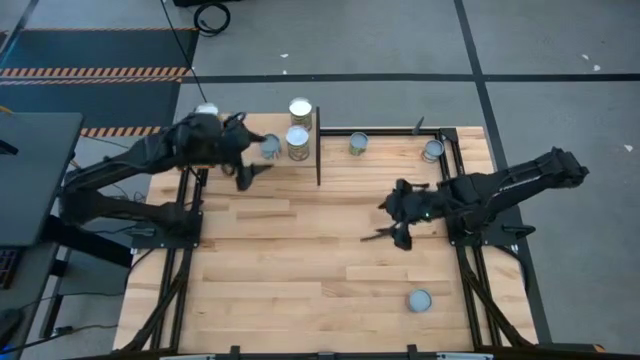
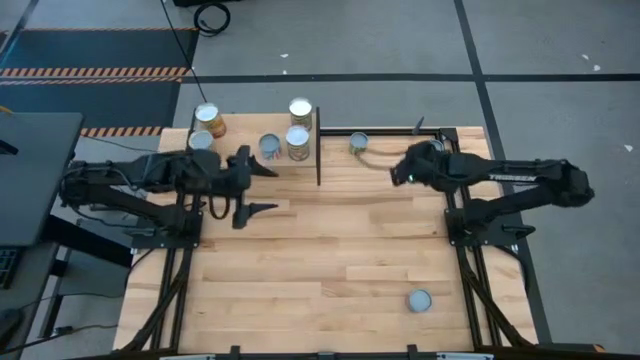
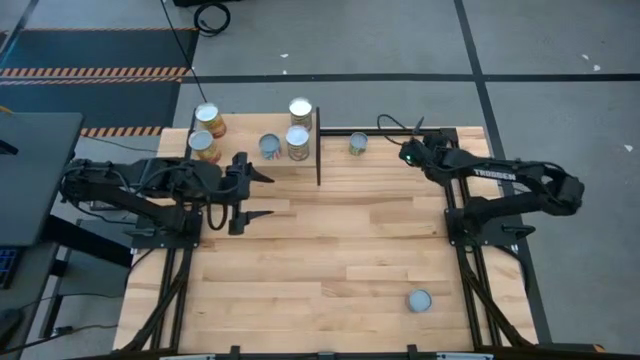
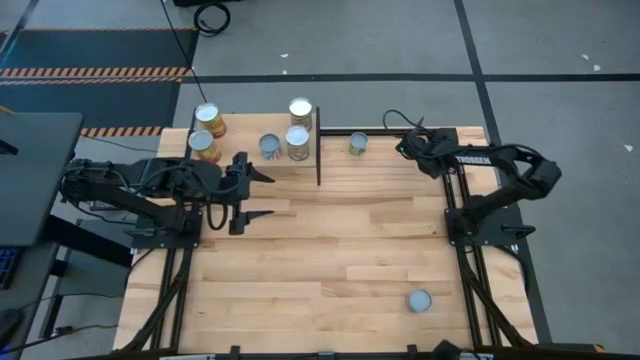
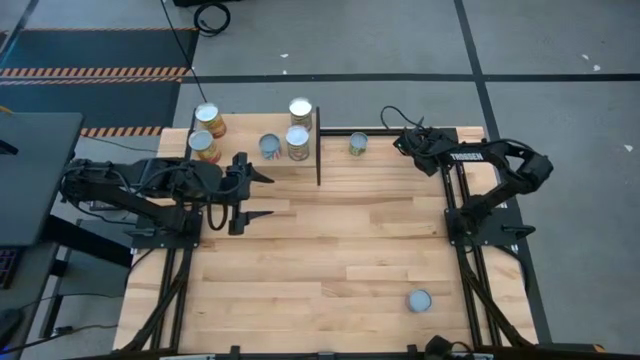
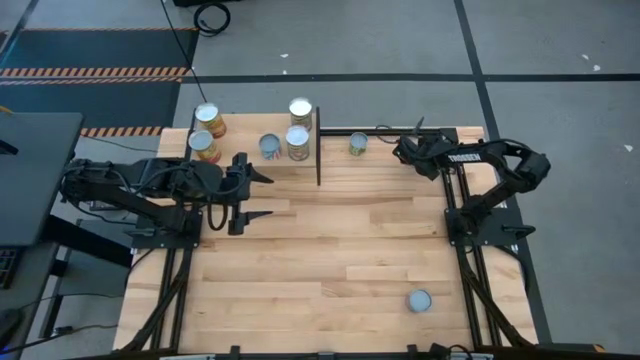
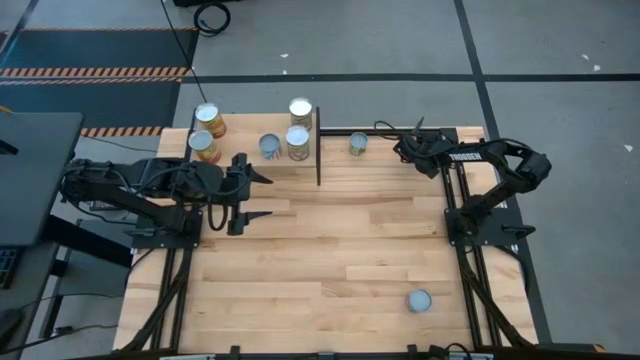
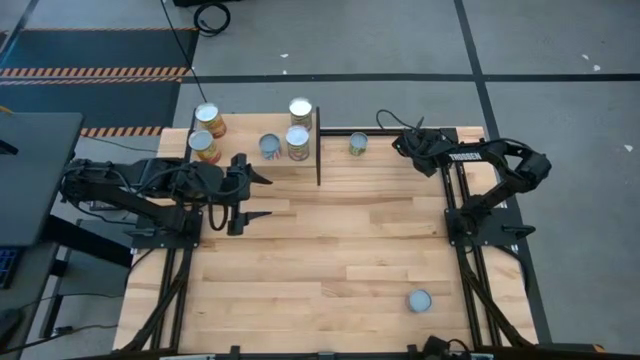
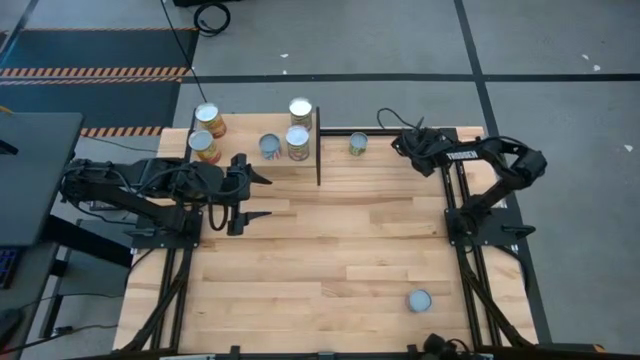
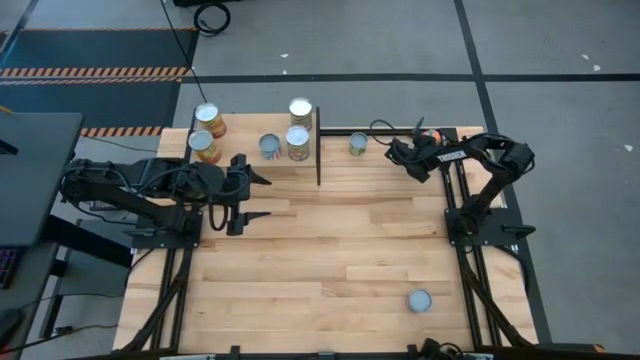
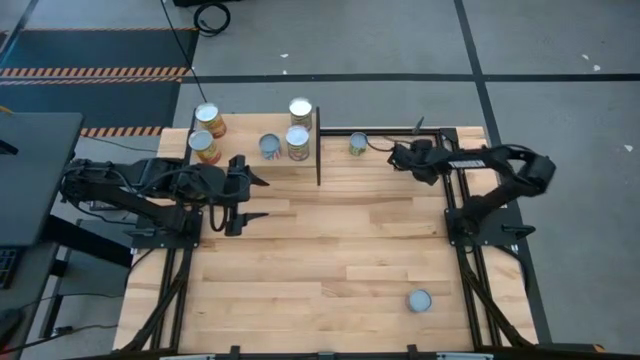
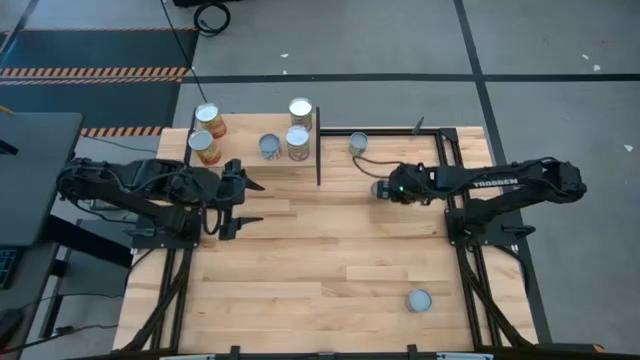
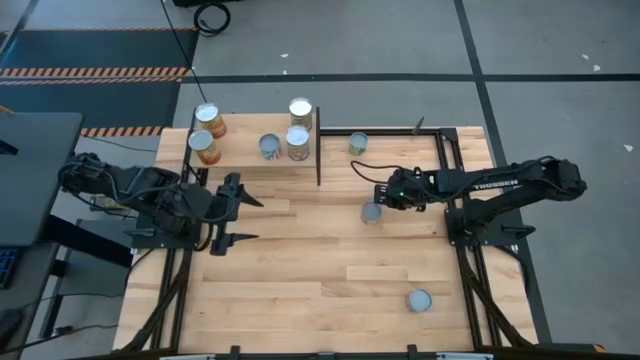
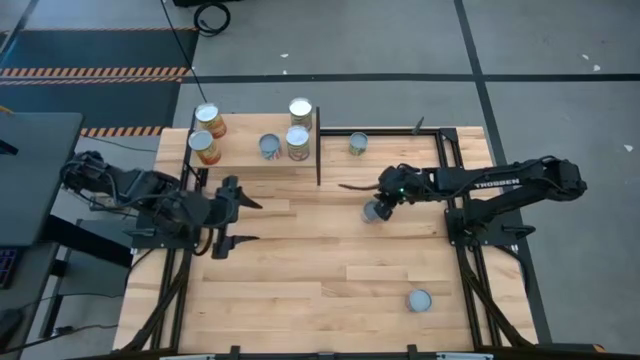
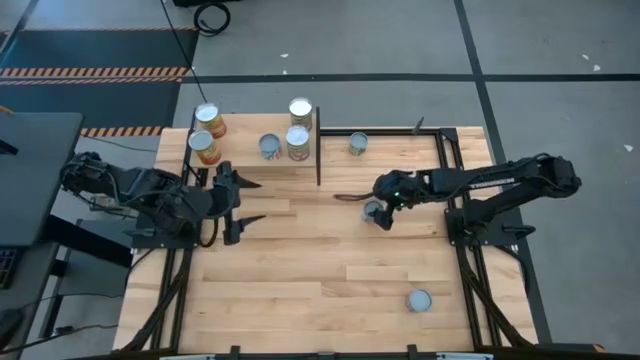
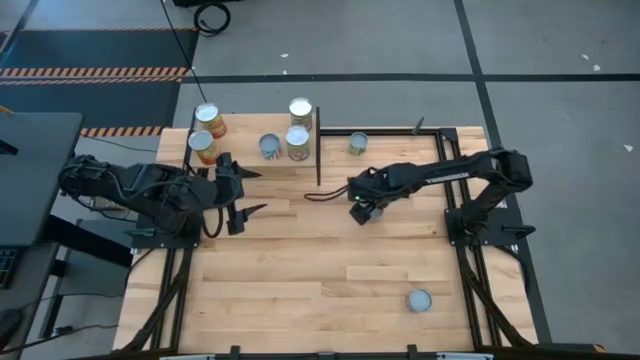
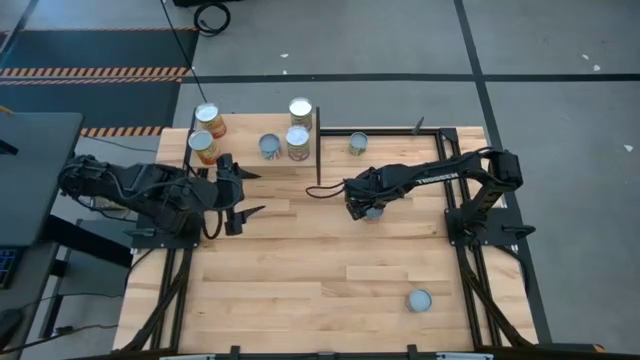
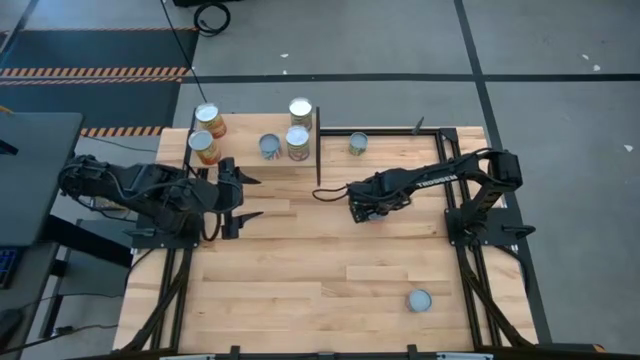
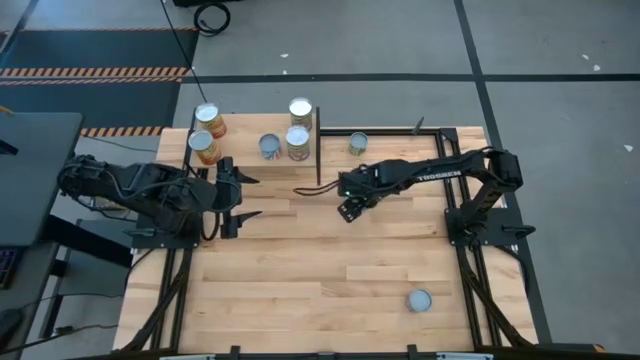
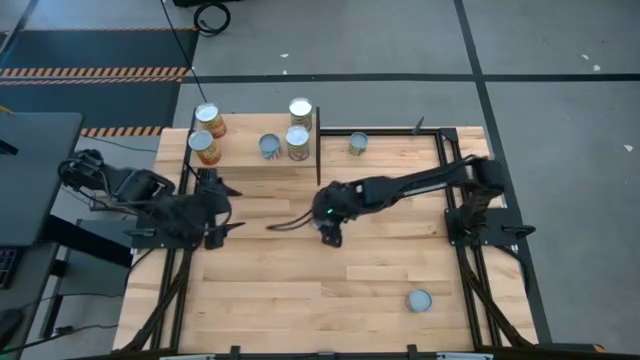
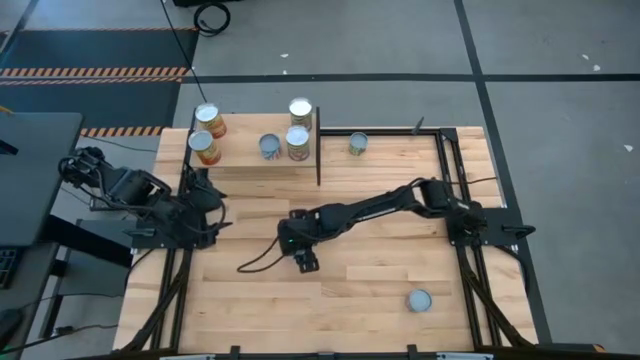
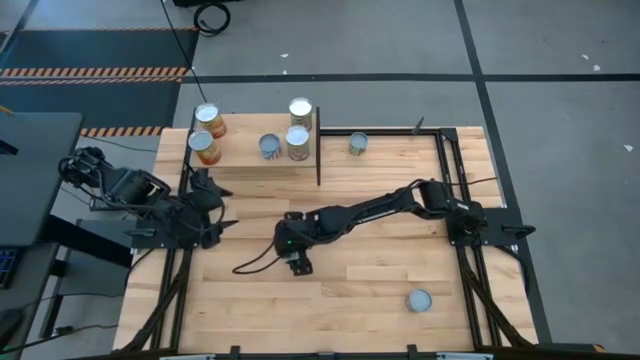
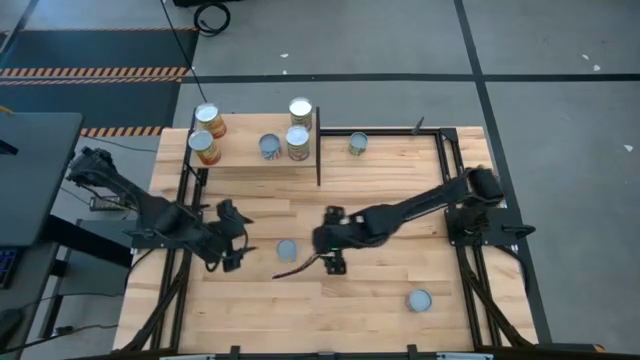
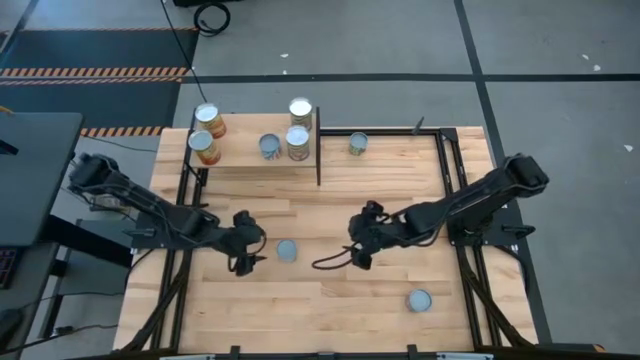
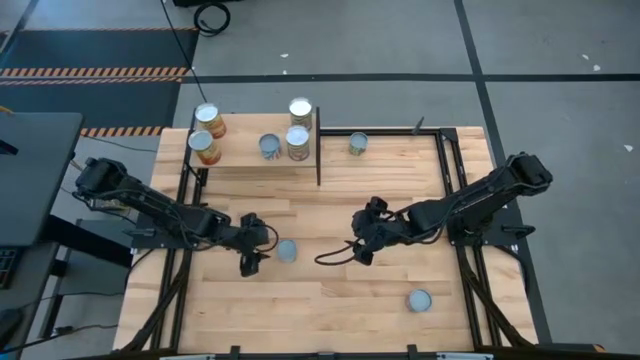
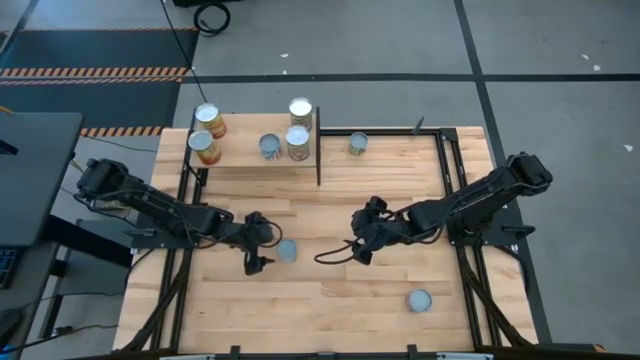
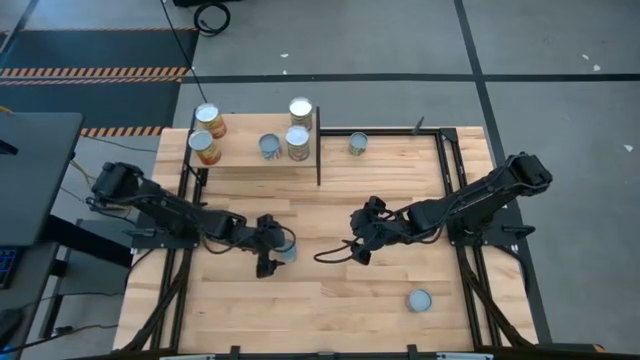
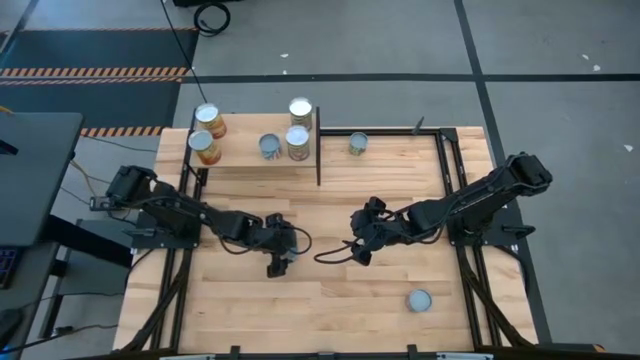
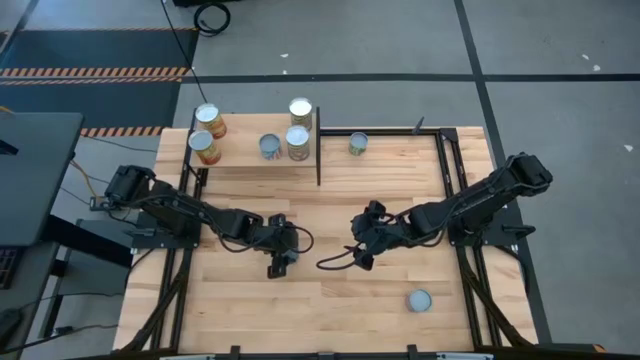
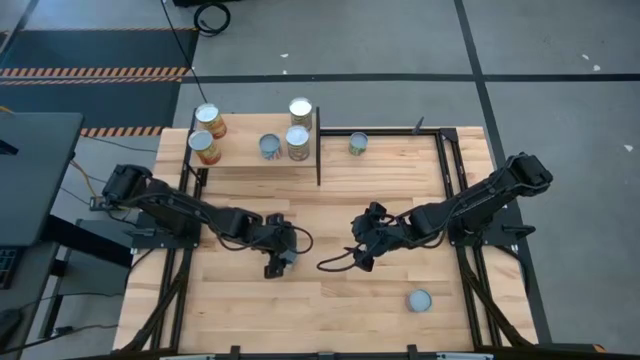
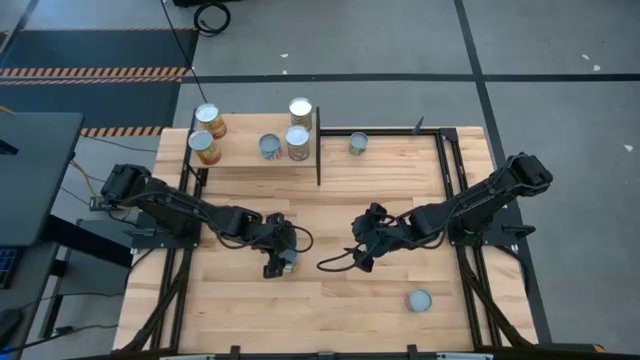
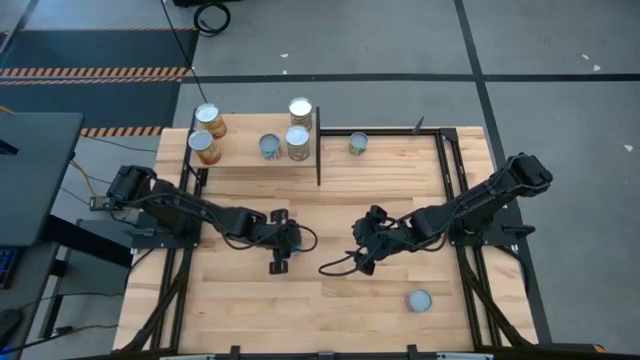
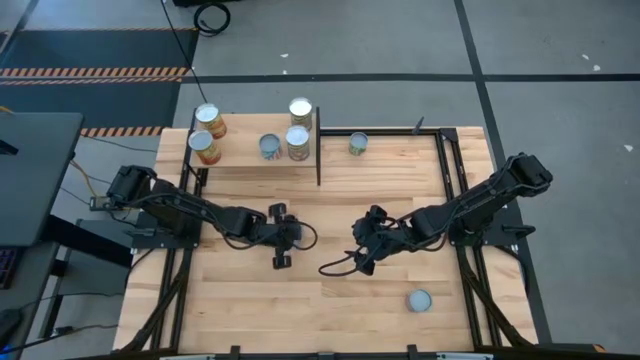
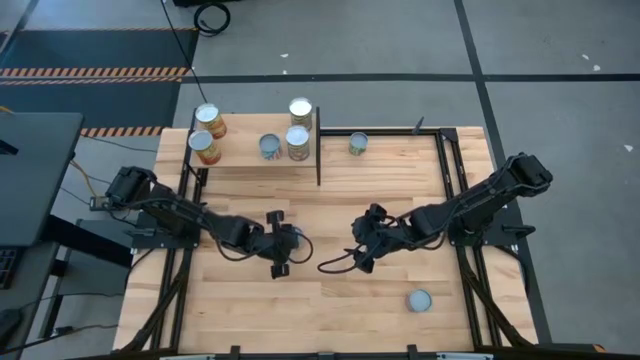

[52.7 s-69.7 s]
Task: Pick and place cans onto a shelf
Put the canned oranges on the shelf

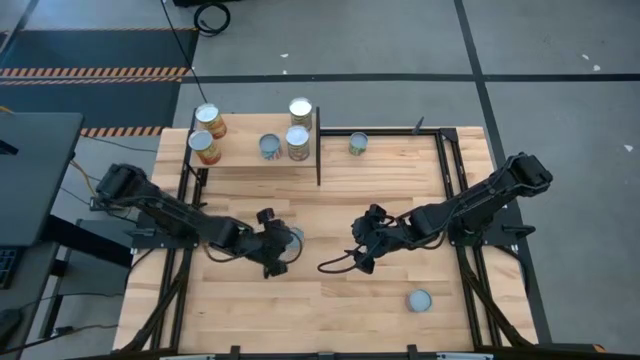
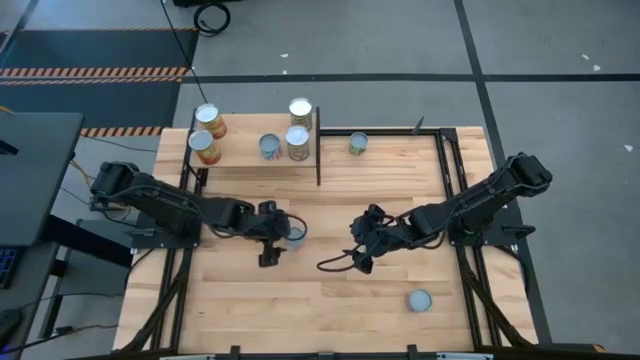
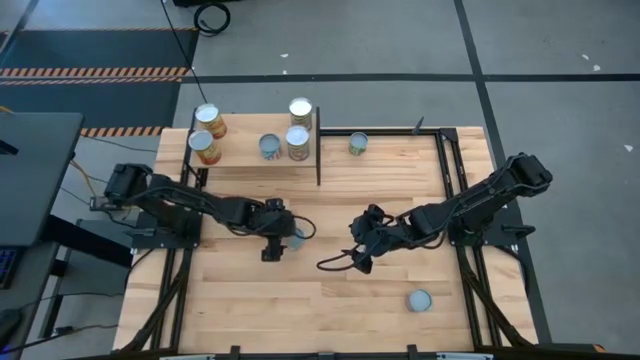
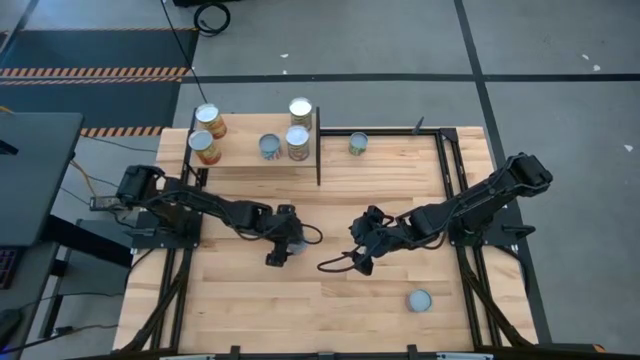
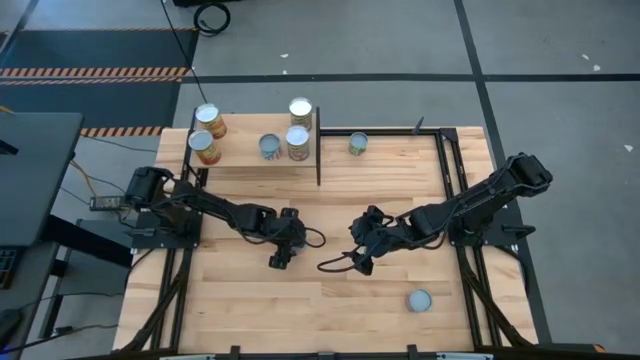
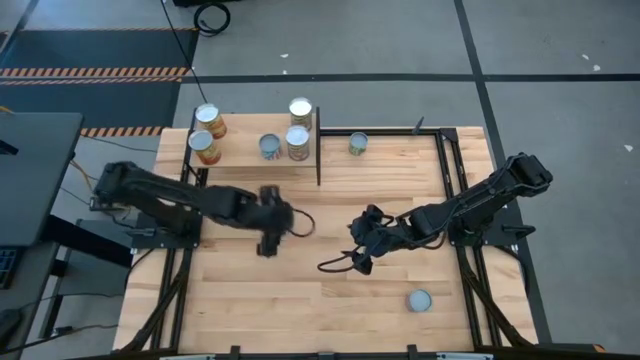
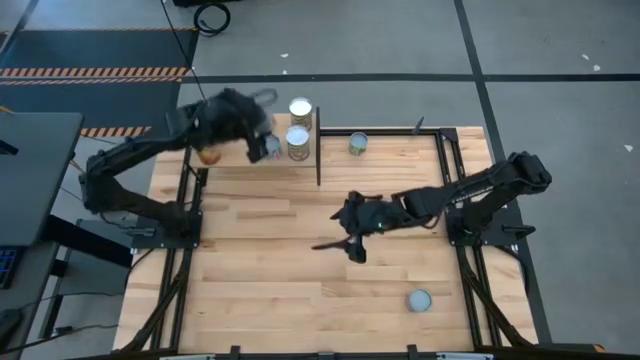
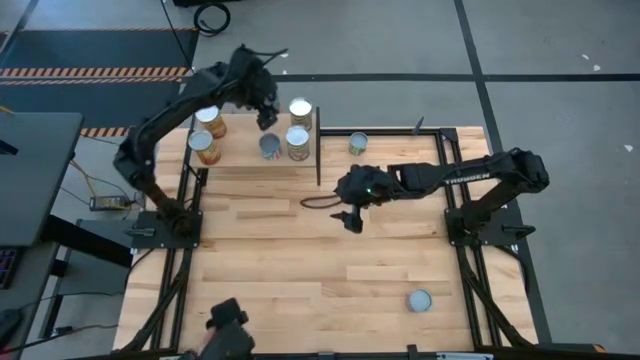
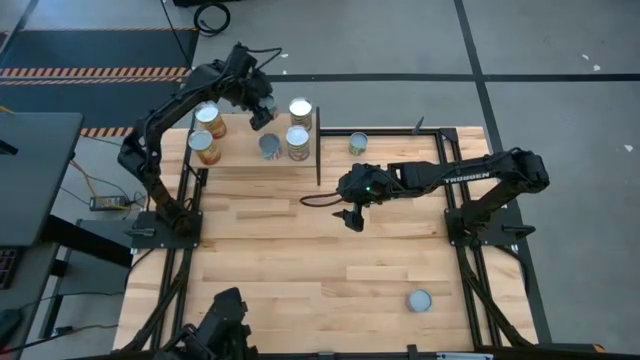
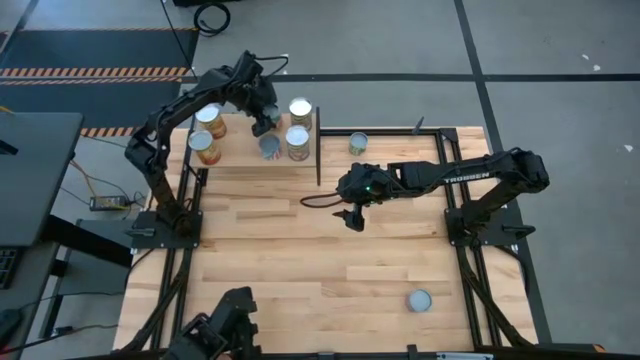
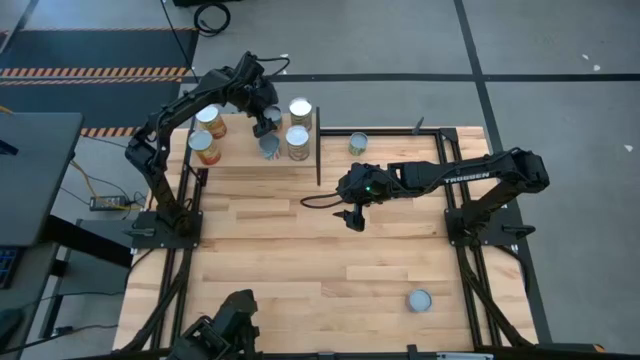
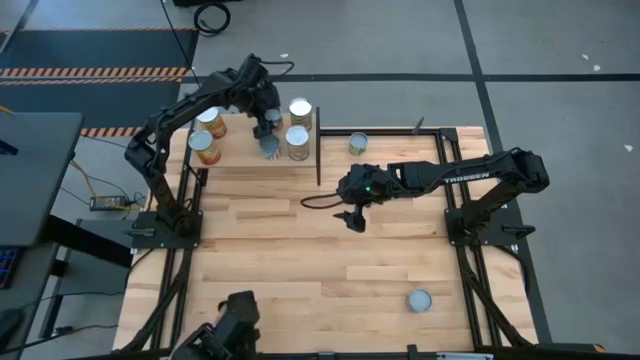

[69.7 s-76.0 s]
Put the canned oranges on the shelf
